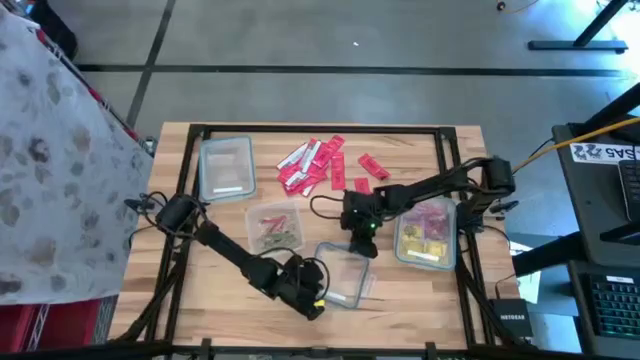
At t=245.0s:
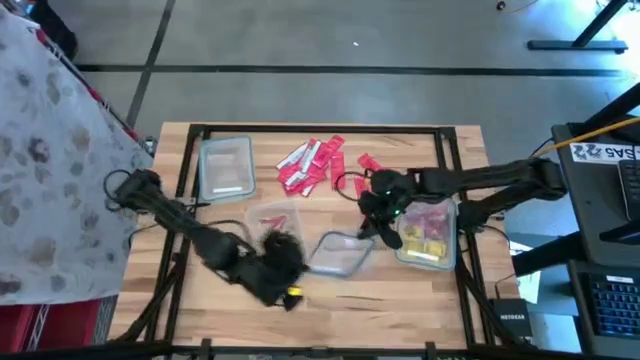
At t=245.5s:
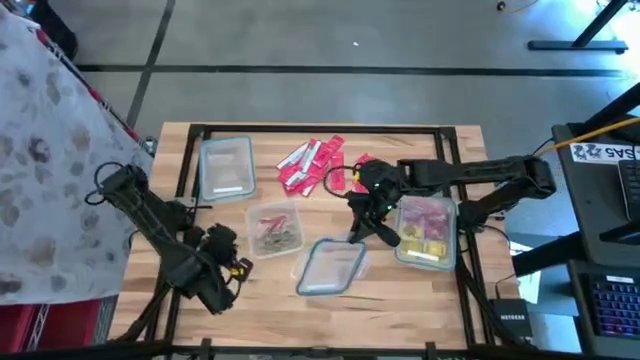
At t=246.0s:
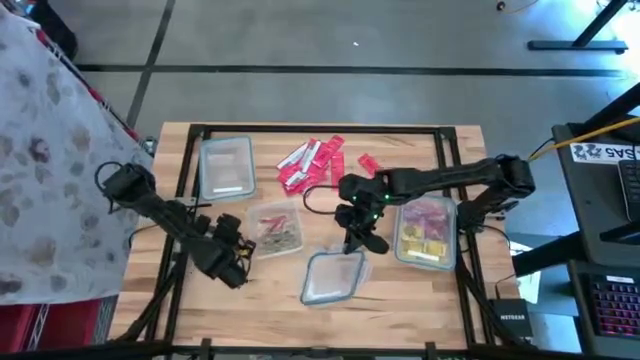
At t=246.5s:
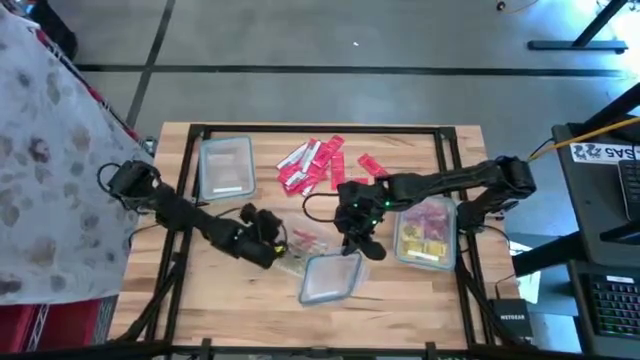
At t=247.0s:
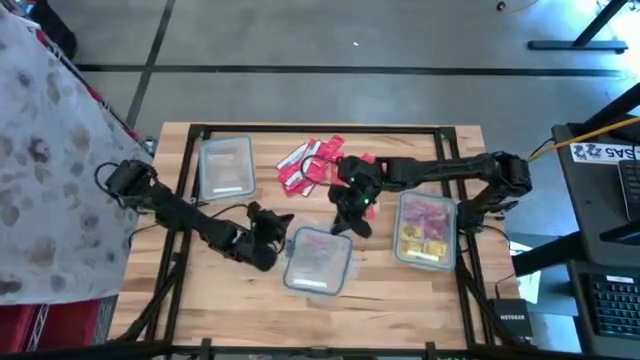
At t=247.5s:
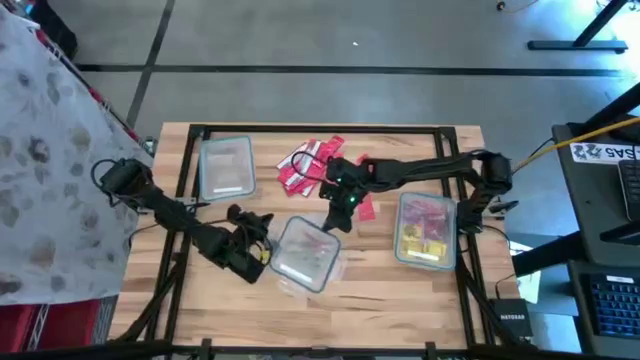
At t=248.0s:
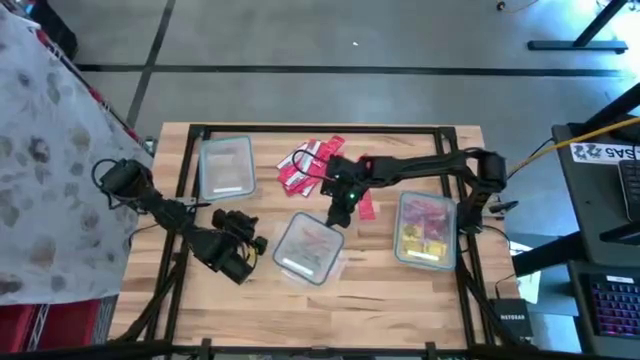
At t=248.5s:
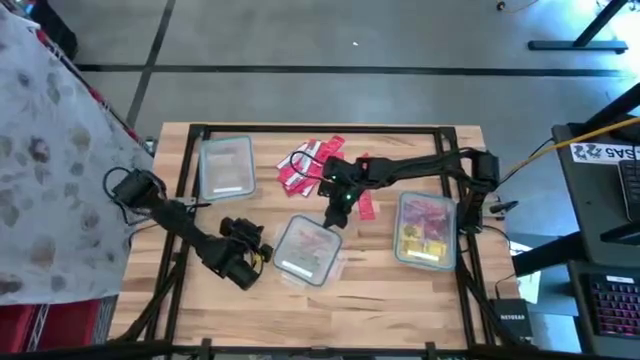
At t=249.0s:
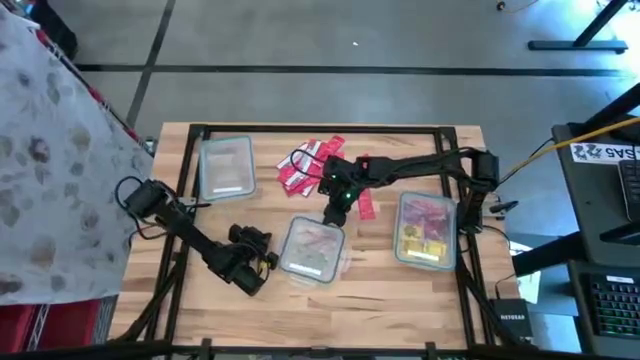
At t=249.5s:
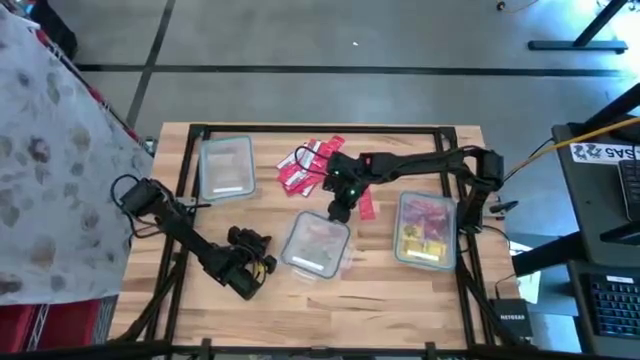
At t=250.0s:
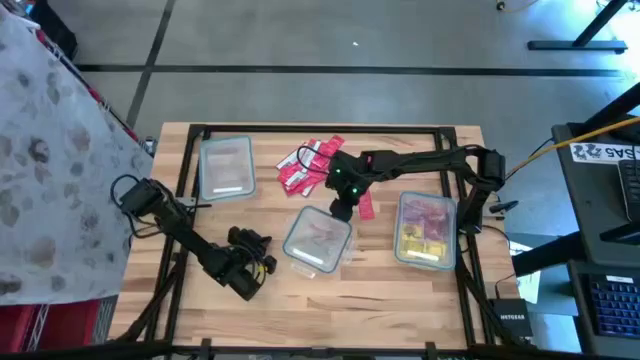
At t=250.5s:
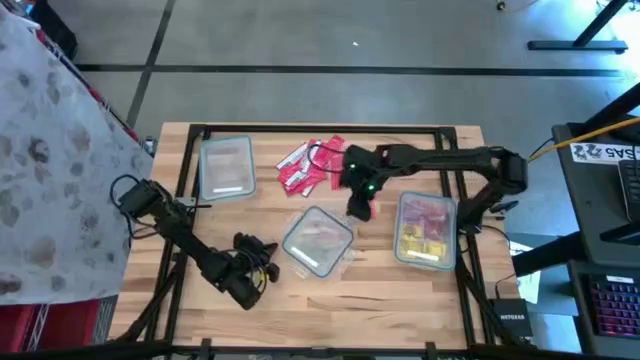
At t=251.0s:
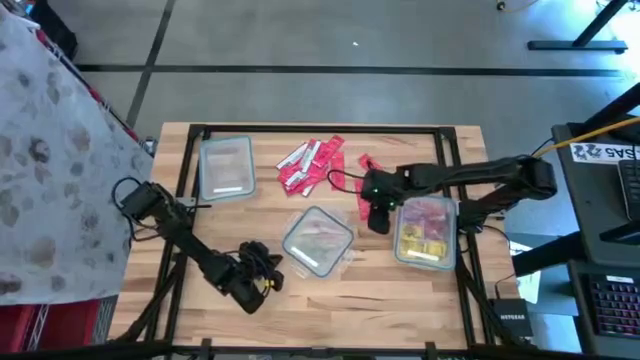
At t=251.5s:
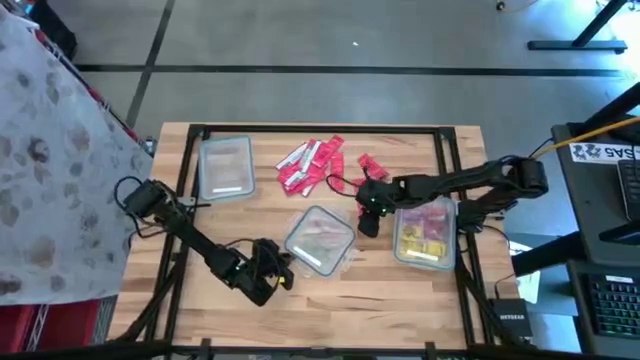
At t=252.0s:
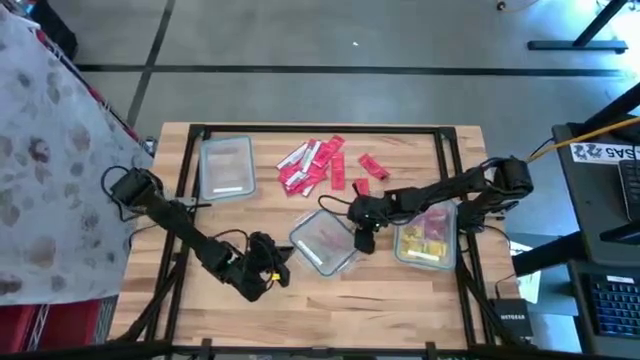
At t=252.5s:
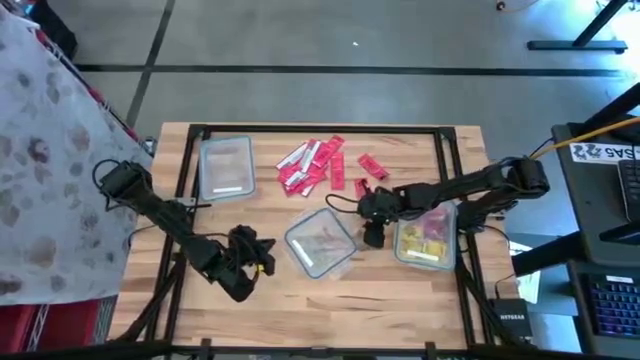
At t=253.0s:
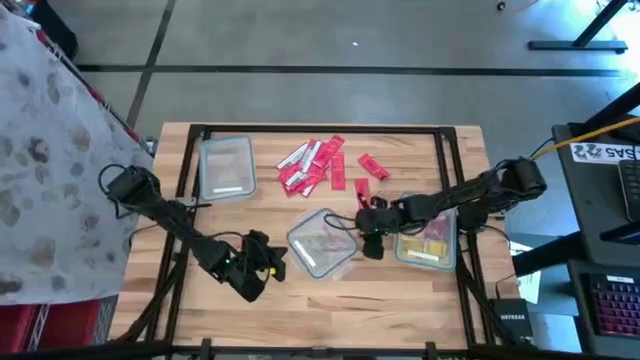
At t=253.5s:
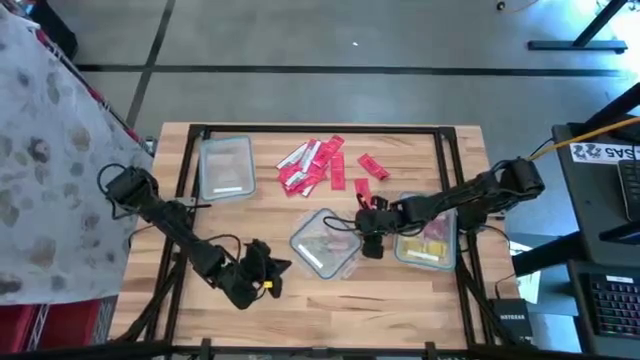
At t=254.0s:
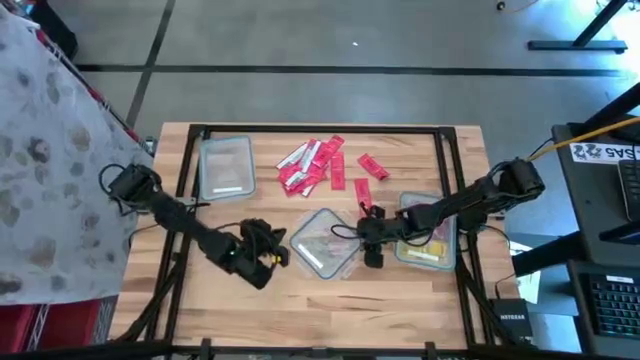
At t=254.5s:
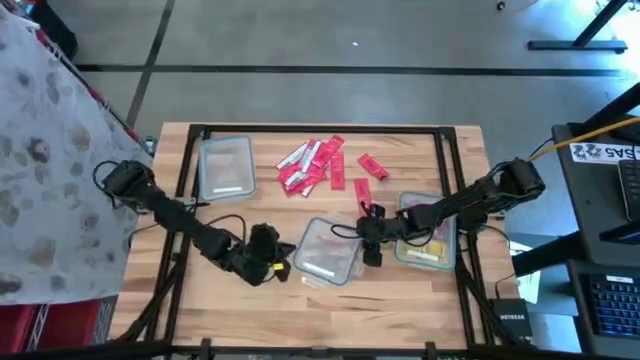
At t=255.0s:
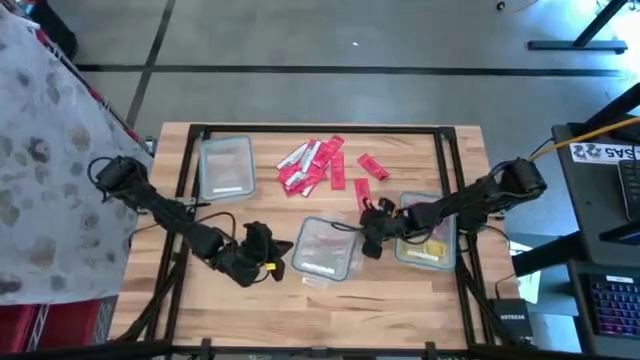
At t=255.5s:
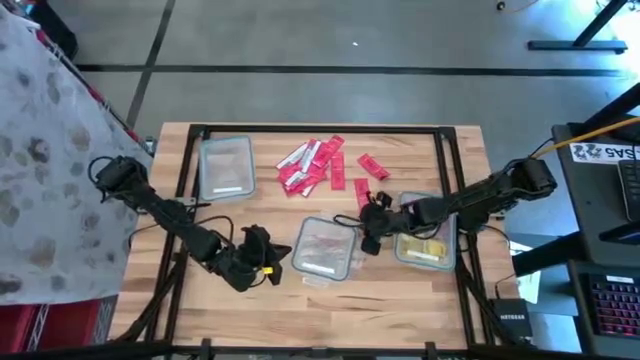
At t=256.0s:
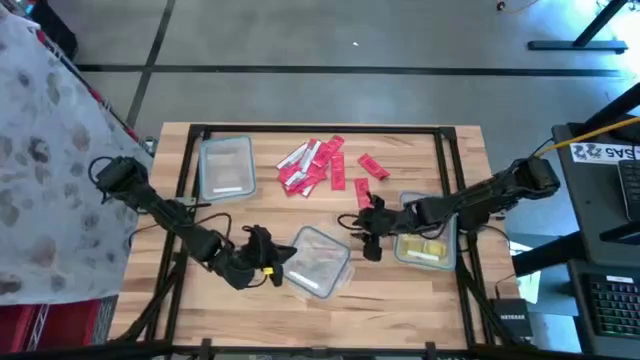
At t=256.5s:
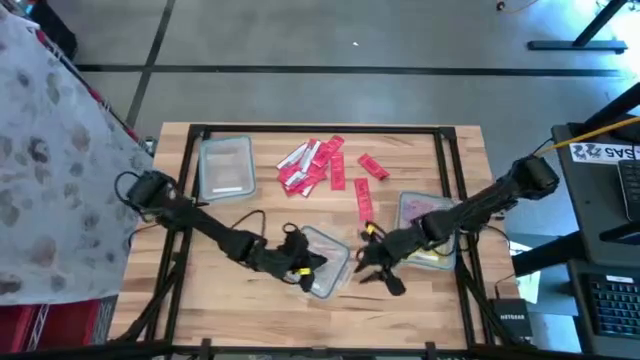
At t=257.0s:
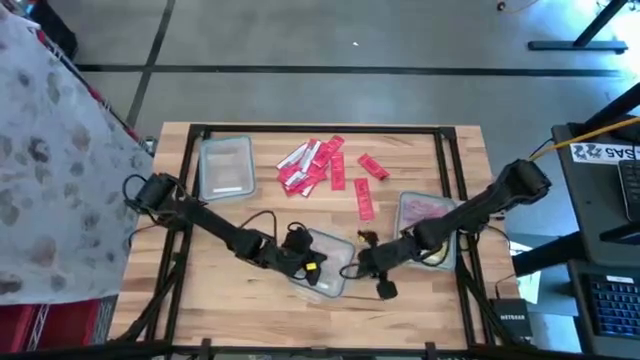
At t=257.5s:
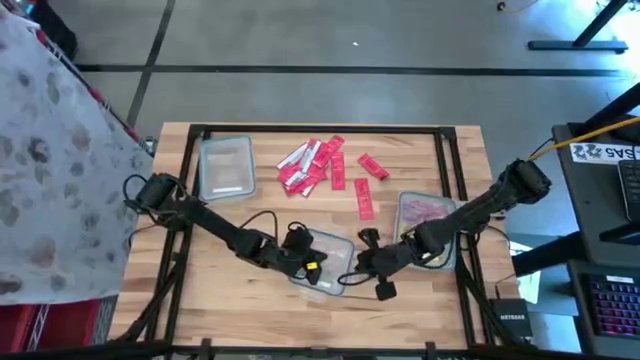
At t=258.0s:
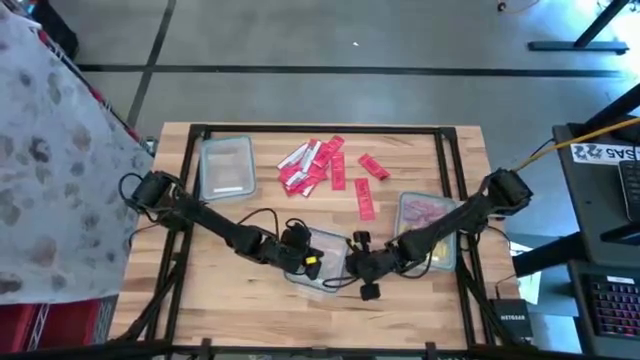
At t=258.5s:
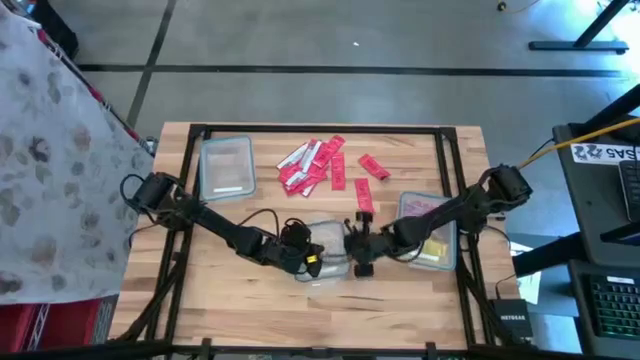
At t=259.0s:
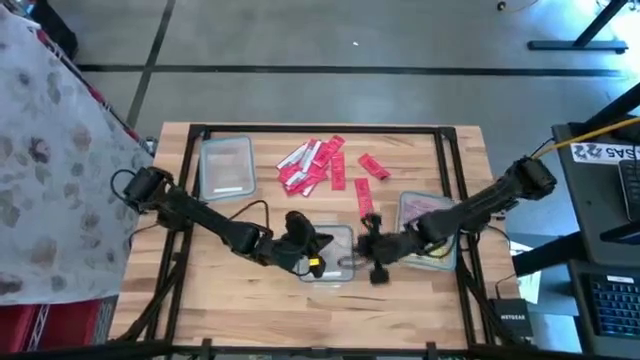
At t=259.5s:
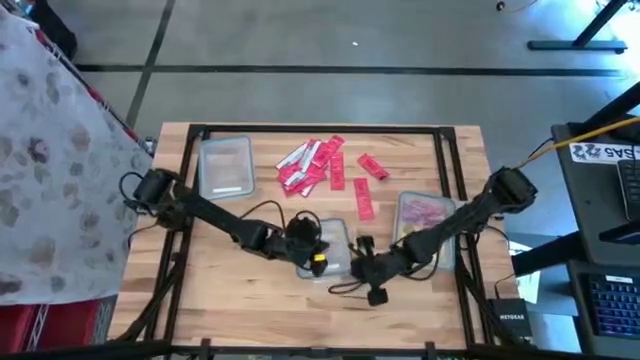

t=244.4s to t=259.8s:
Task: Sort candy
Close the square transparent bin

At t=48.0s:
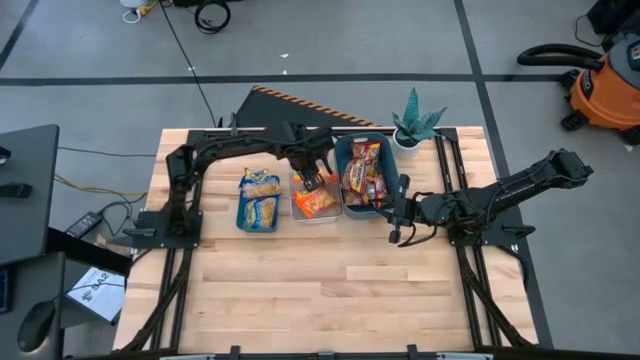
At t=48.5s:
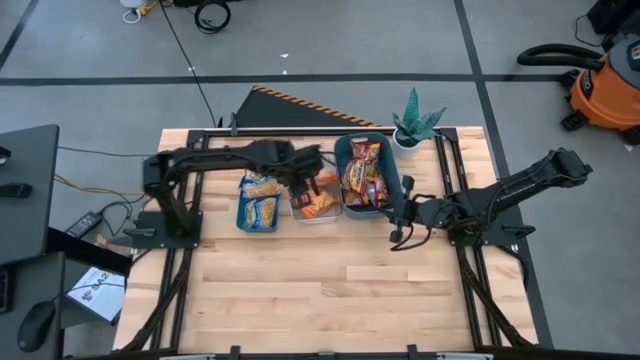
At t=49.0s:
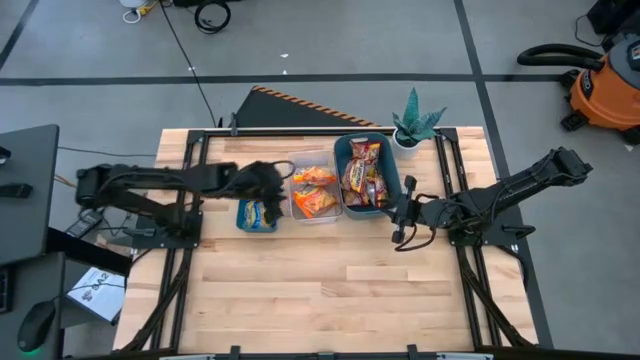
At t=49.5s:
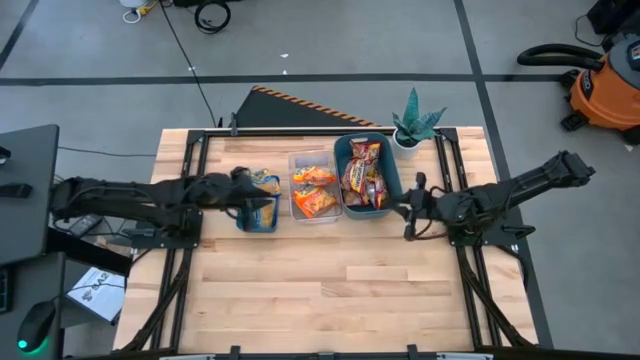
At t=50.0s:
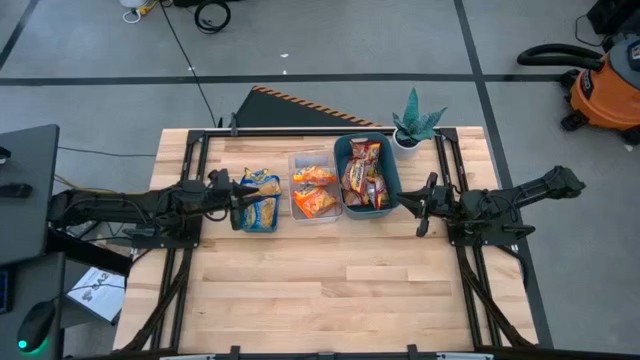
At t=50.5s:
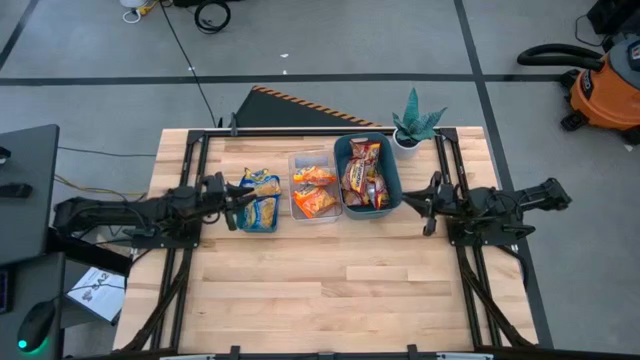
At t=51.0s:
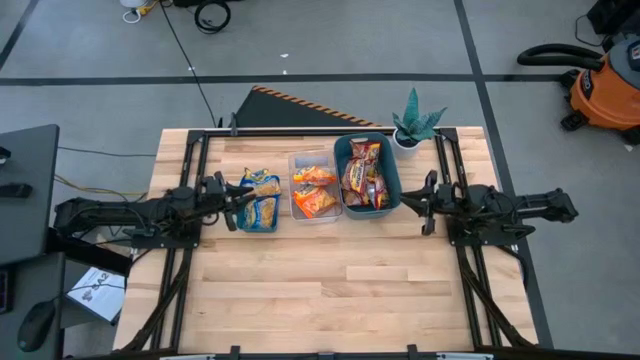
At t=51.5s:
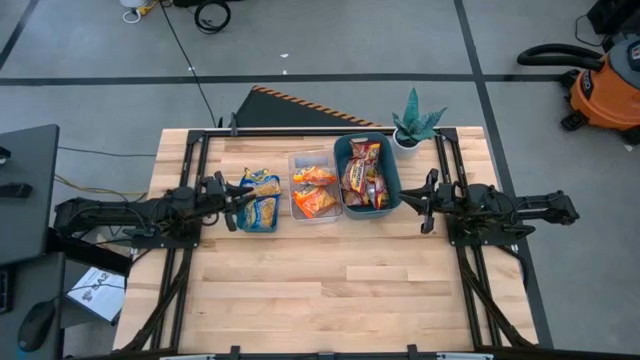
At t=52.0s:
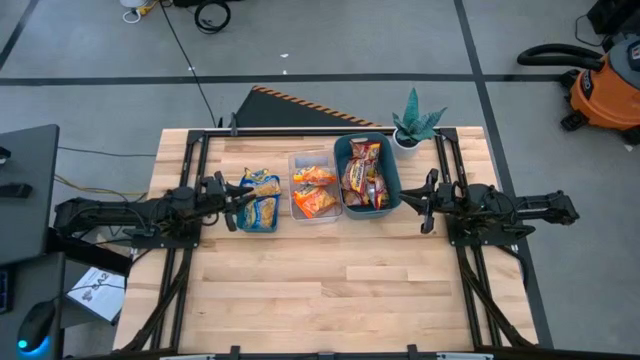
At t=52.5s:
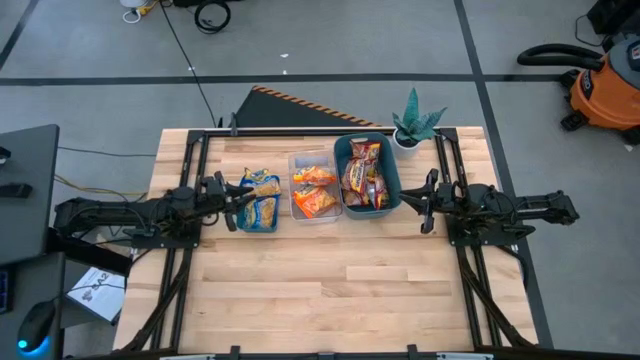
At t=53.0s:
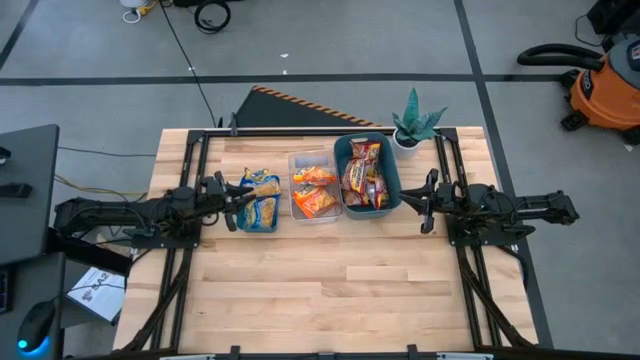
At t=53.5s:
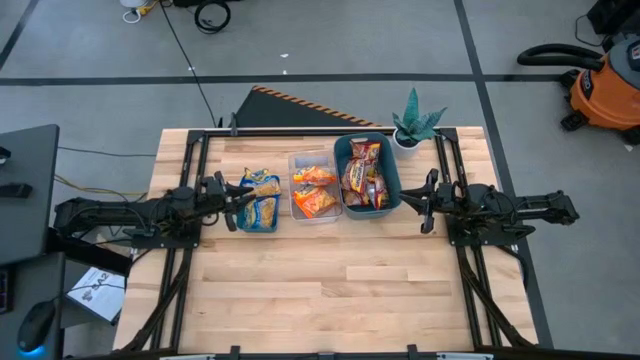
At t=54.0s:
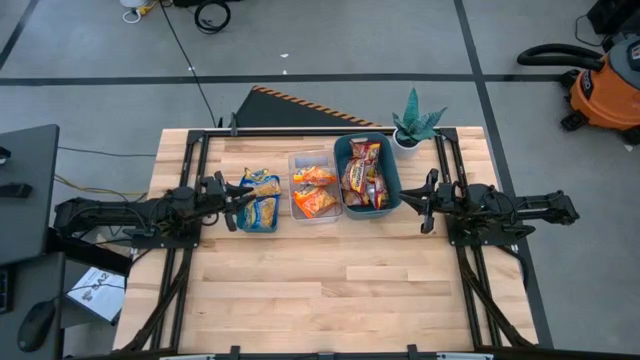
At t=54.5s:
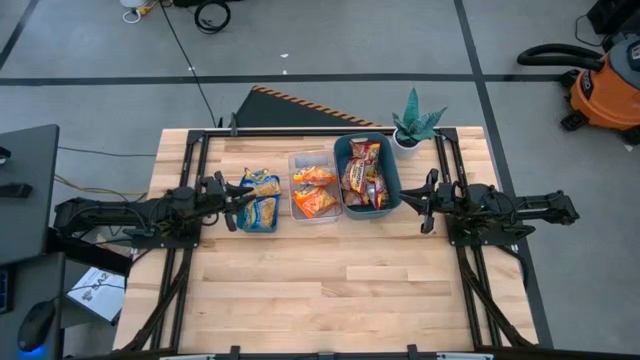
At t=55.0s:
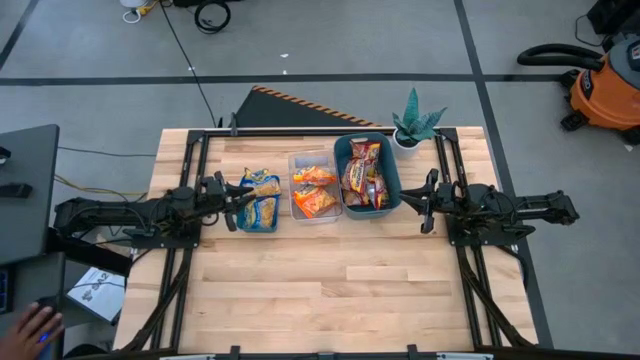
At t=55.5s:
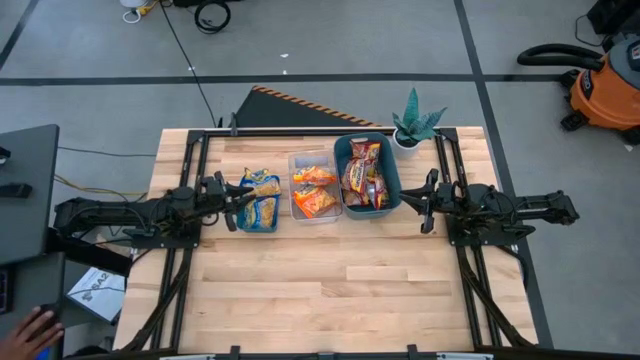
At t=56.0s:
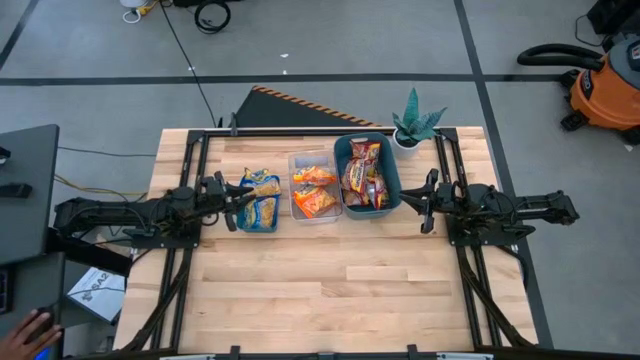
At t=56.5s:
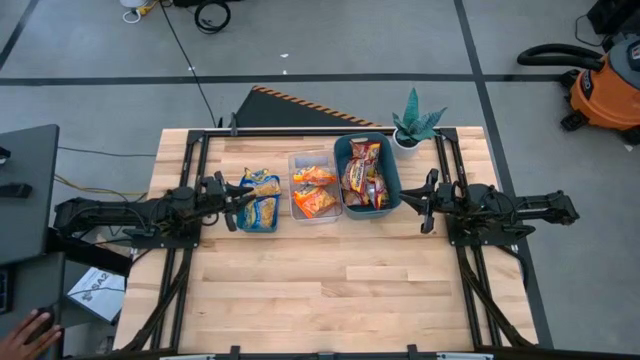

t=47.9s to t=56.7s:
Task: Sort Maruchan noodles
Return to Home Position
